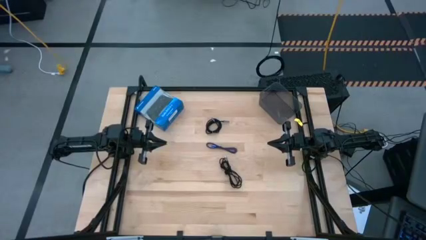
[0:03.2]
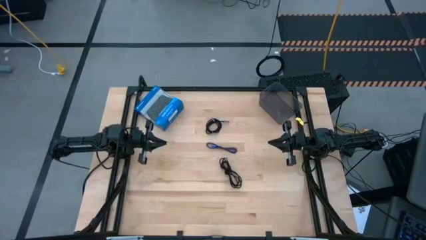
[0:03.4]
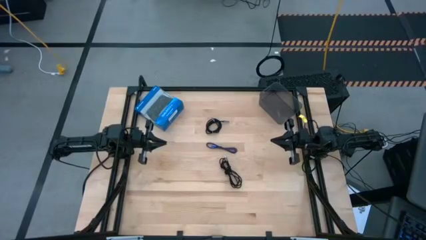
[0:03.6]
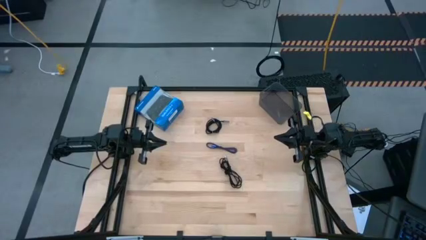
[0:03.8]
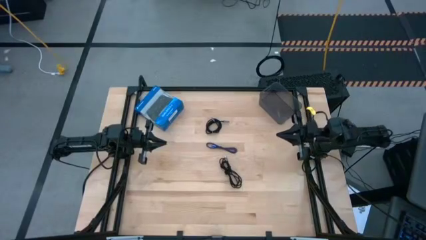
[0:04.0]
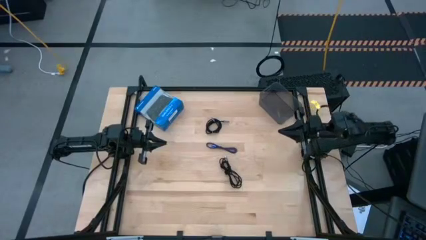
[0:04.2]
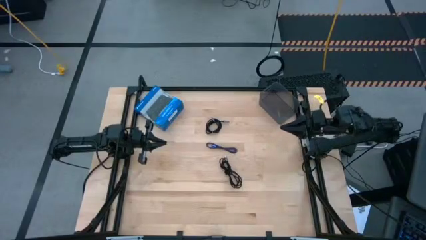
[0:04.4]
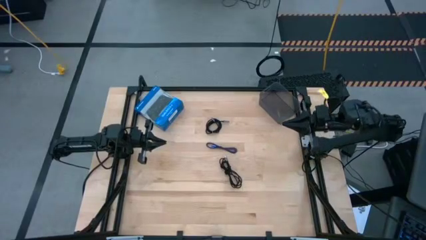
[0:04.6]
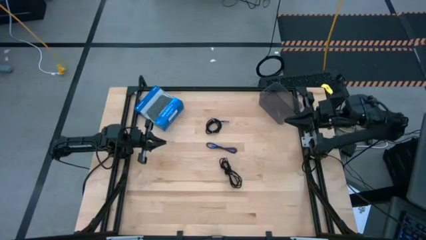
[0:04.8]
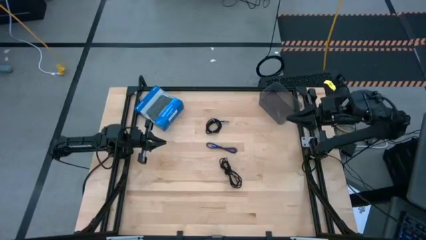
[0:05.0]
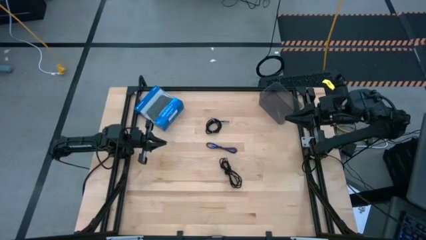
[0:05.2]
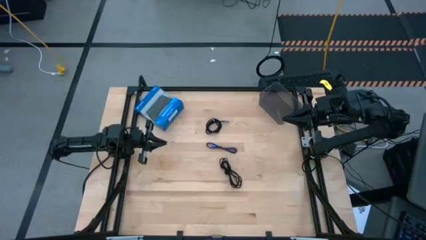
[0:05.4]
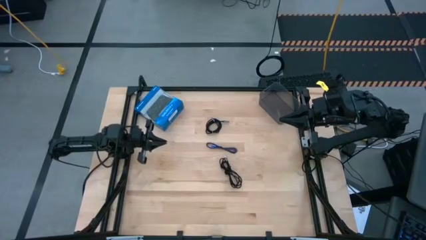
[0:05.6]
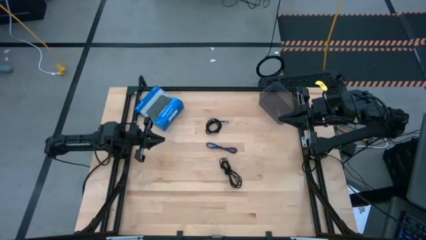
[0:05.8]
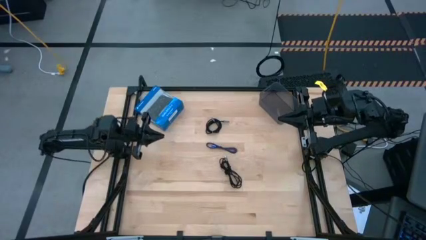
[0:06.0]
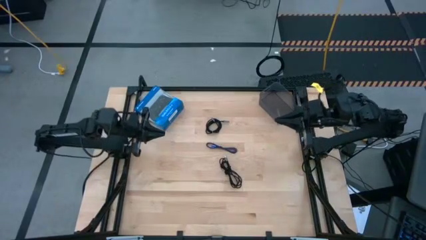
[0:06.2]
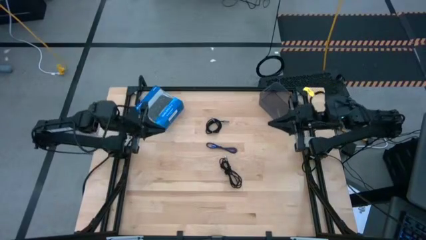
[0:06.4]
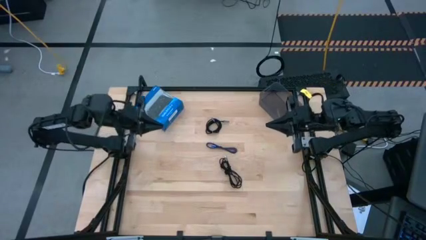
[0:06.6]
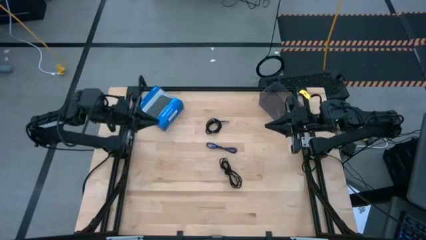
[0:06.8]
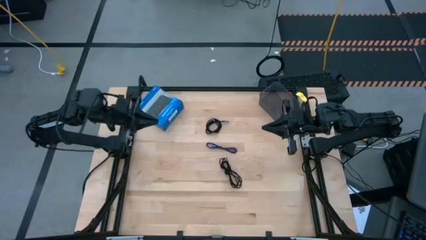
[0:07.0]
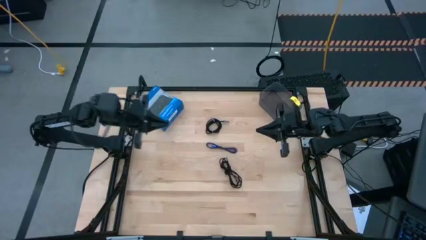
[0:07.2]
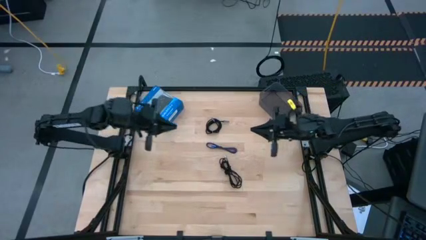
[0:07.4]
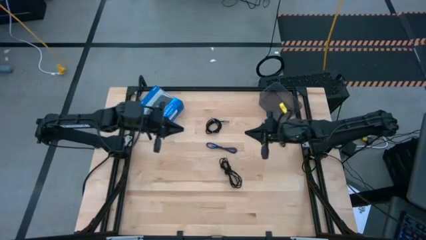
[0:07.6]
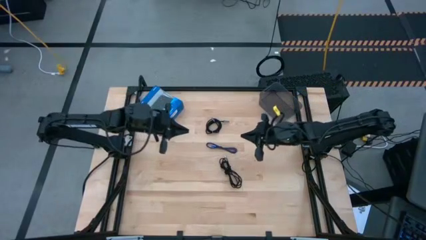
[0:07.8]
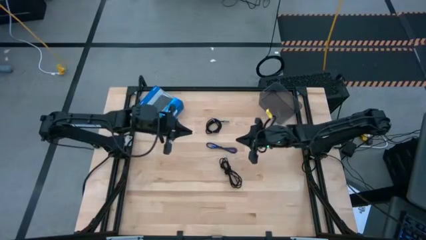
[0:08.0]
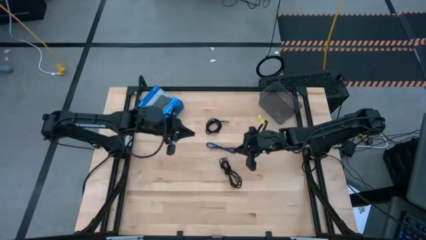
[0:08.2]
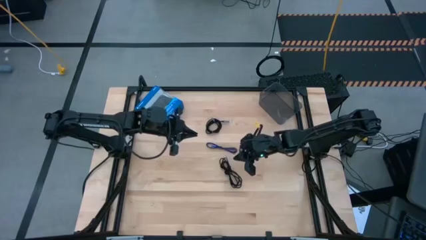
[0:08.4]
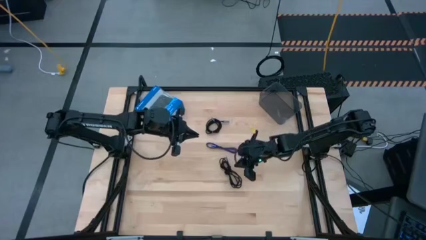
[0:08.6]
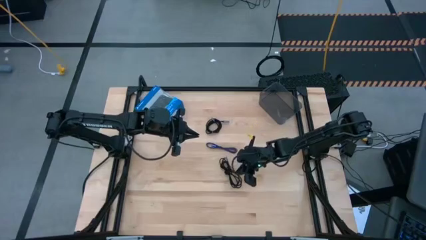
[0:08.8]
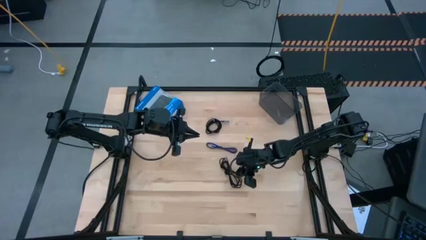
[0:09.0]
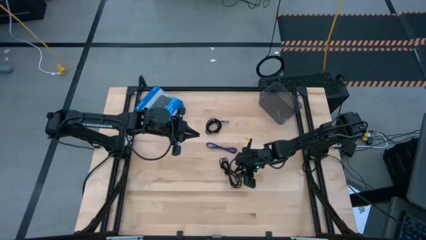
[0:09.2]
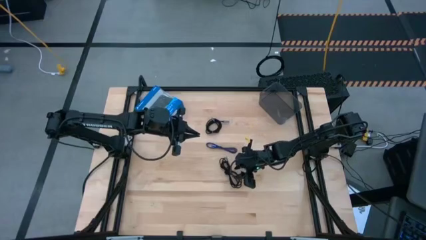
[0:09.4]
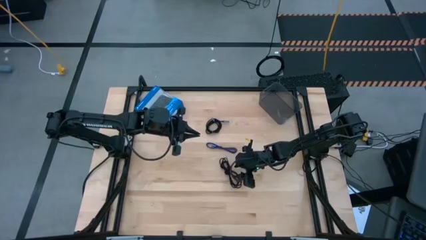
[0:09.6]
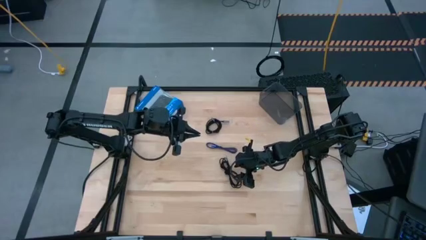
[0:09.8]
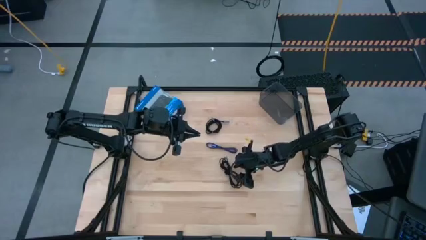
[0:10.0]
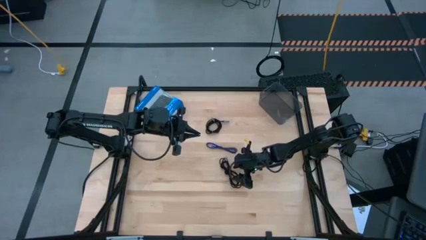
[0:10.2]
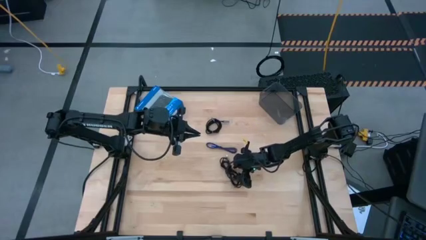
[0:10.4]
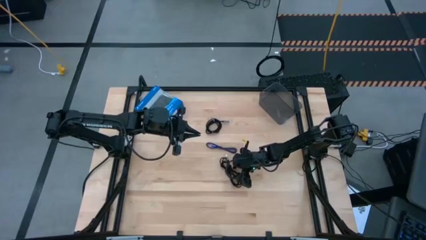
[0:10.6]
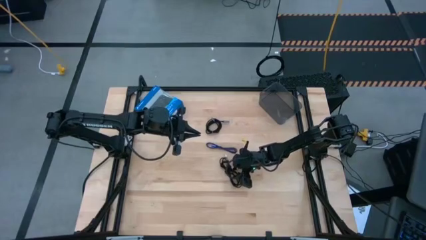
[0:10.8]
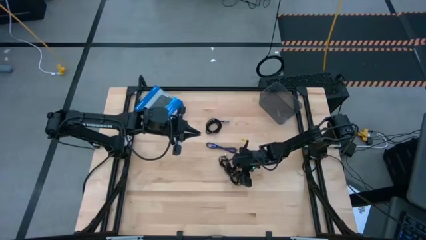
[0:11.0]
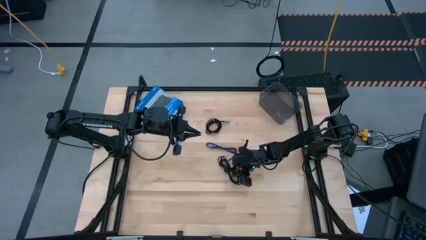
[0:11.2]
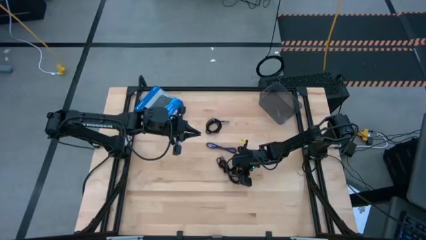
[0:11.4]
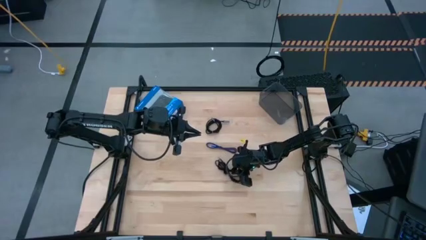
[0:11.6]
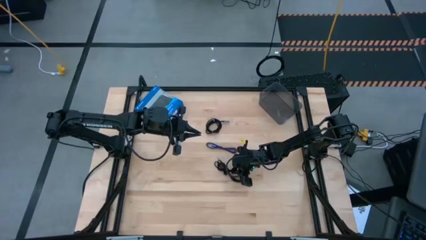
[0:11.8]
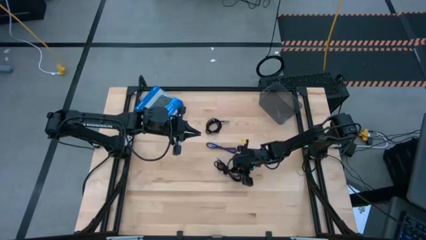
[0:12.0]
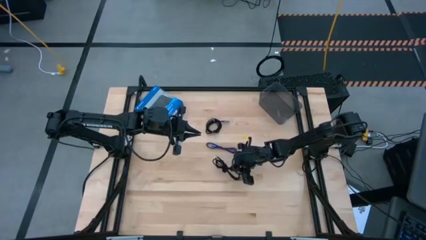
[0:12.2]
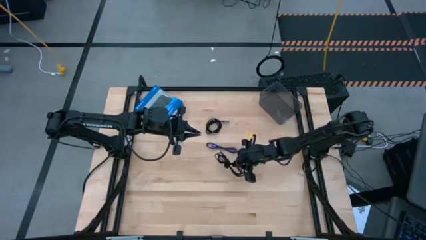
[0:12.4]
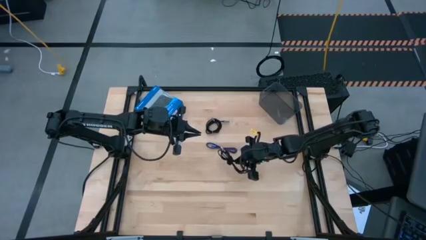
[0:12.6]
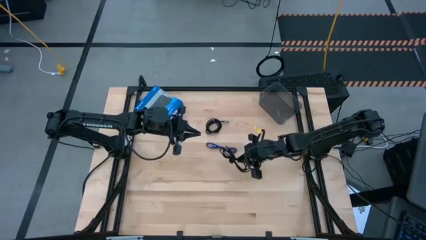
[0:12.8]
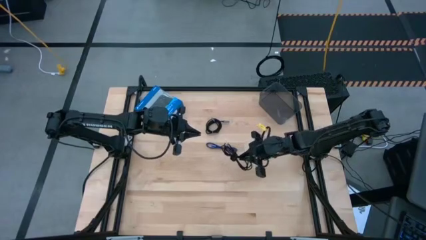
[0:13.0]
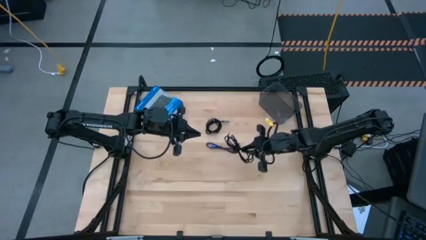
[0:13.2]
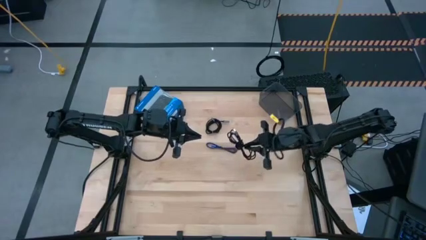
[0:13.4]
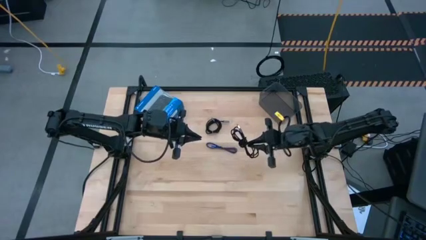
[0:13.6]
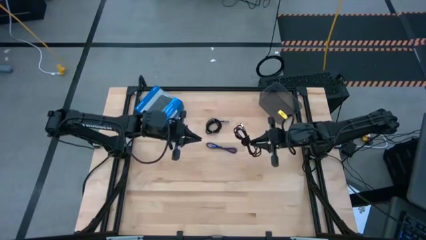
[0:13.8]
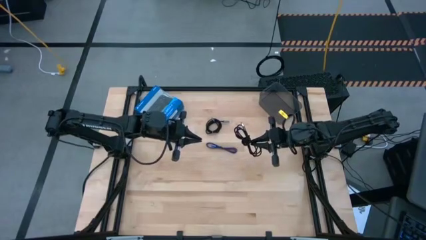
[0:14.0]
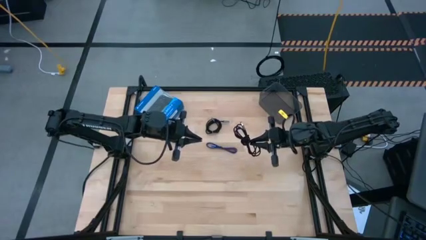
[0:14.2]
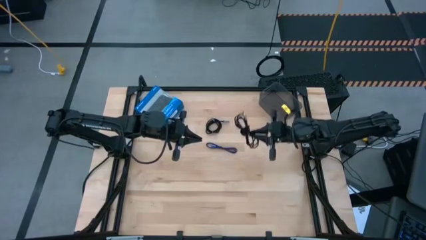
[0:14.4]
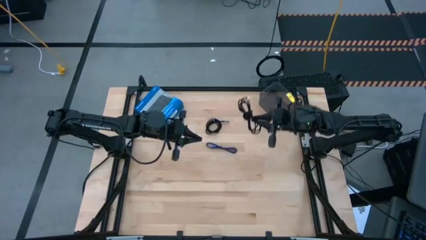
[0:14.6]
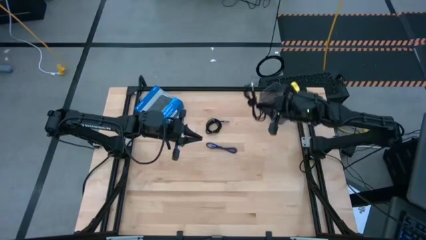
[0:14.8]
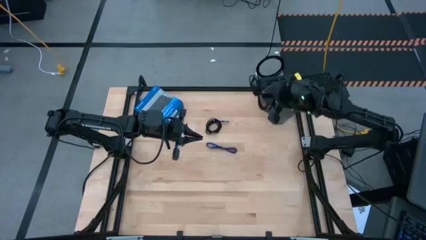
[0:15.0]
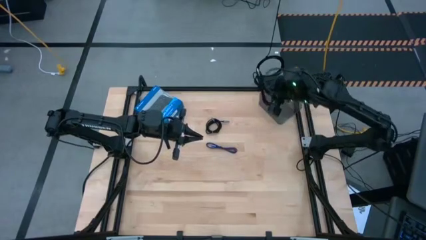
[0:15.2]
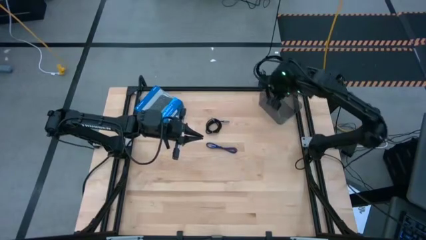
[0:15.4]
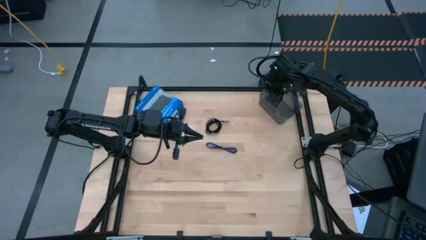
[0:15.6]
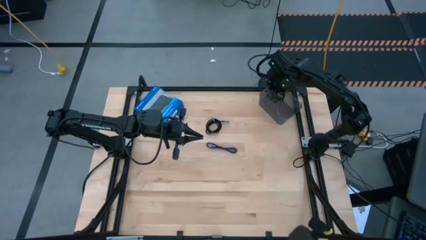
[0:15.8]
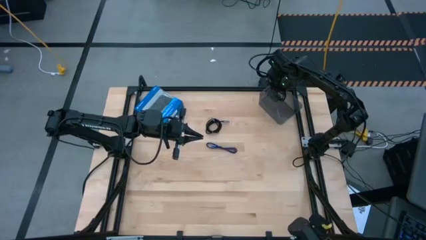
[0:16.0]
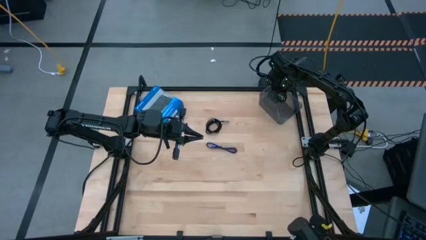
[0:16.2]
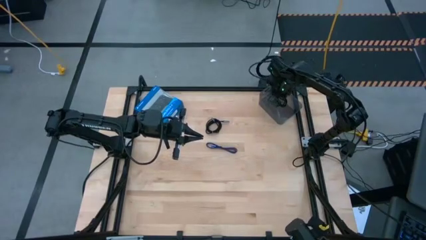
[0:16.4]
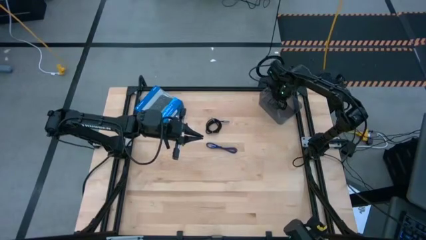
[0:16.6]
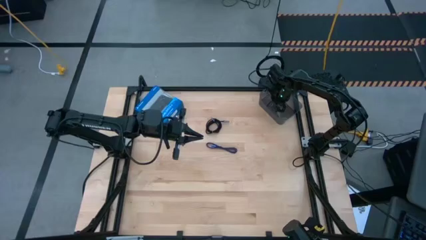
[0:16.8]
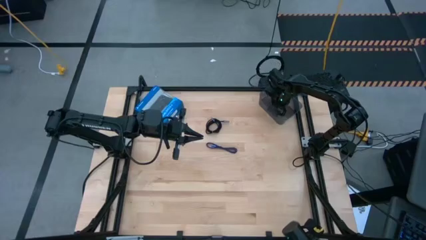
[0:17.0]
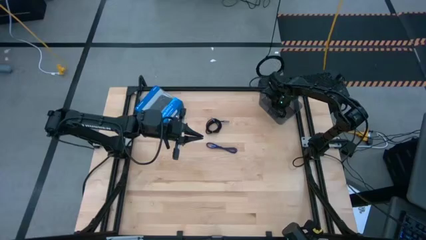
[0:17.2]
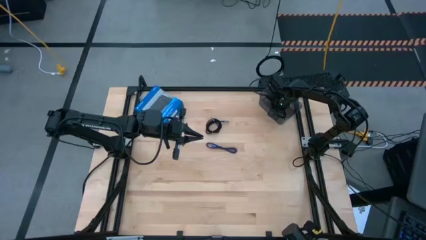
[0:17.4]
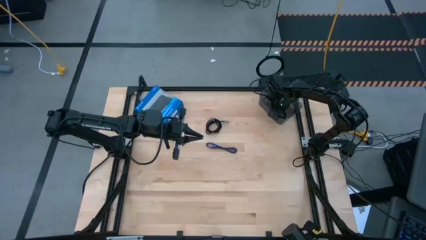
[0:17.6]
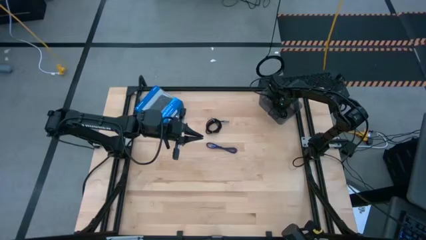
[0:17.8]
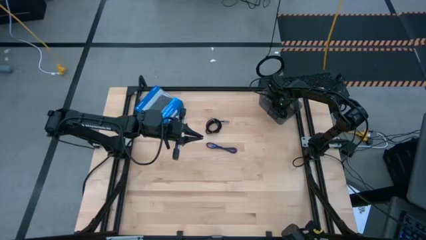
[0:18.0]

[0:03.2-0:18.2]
Task: Pick and place USB-C Cables
Put the bottom black charger cable into the bin
